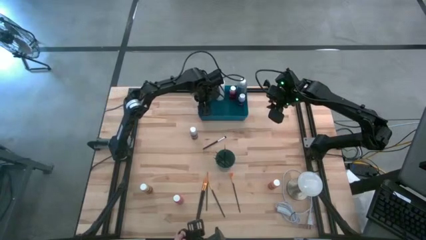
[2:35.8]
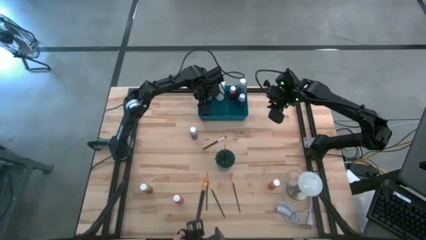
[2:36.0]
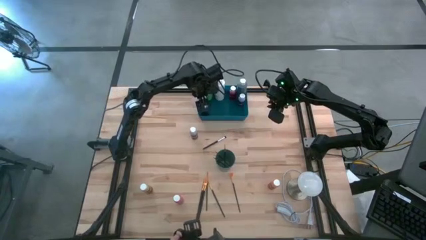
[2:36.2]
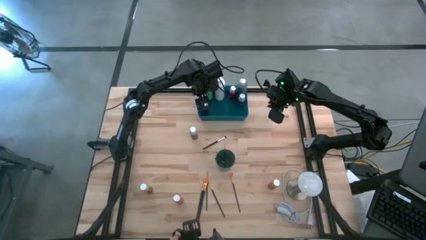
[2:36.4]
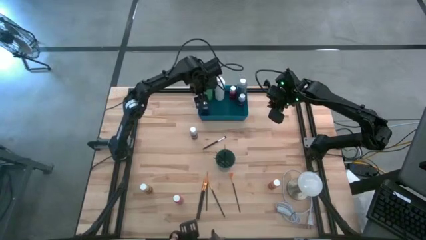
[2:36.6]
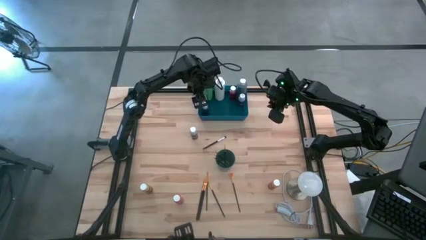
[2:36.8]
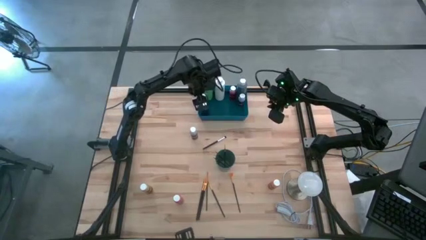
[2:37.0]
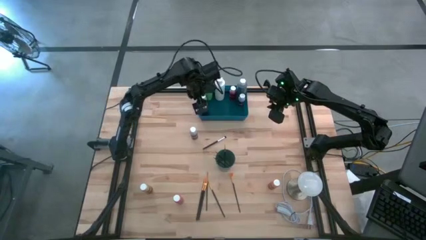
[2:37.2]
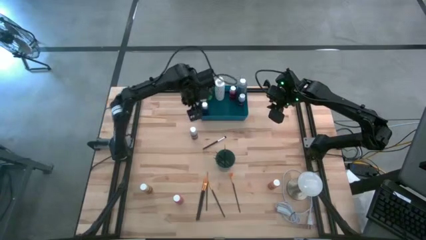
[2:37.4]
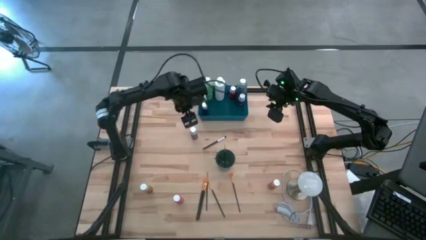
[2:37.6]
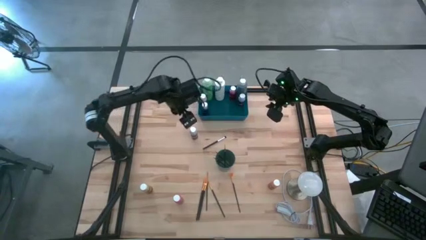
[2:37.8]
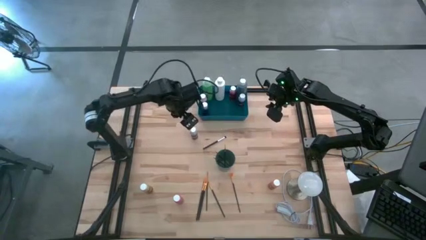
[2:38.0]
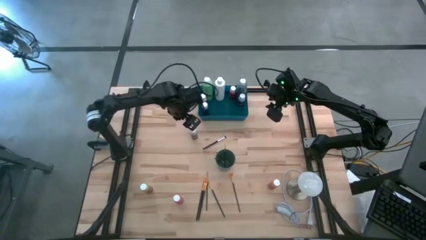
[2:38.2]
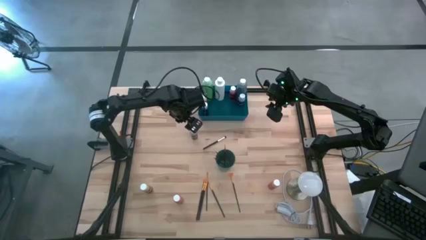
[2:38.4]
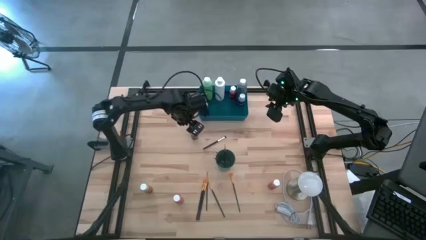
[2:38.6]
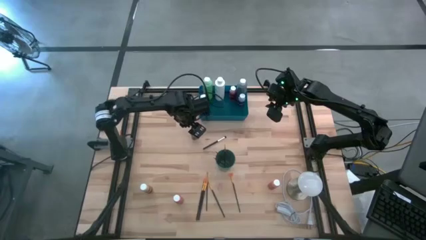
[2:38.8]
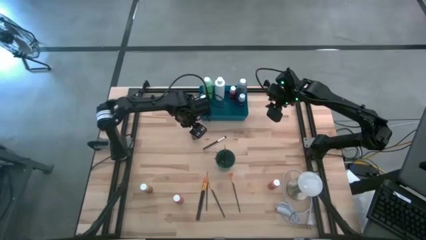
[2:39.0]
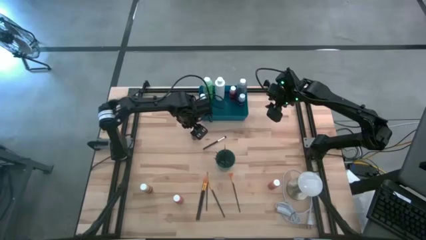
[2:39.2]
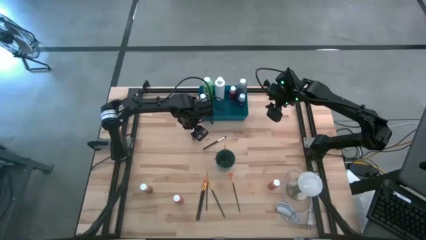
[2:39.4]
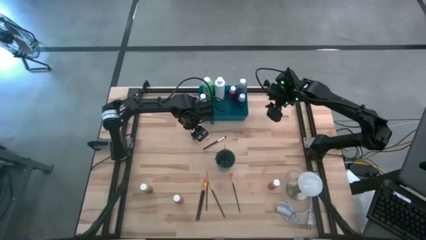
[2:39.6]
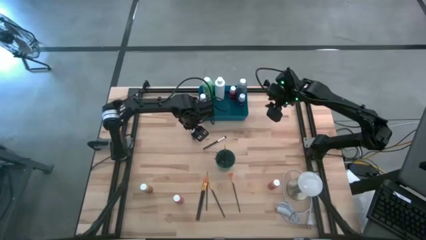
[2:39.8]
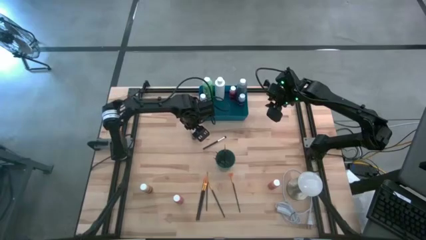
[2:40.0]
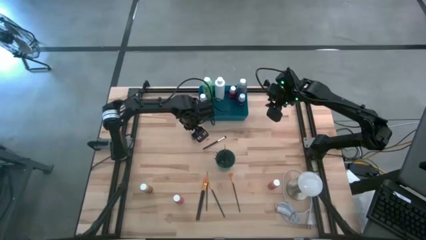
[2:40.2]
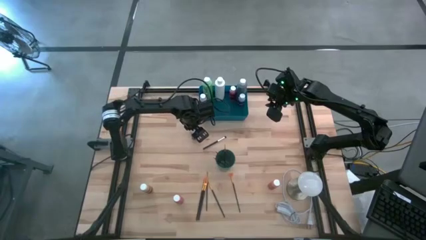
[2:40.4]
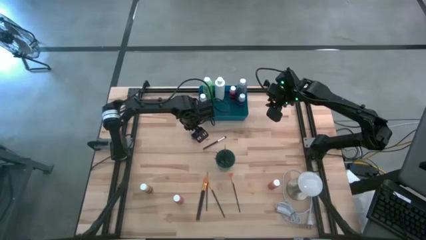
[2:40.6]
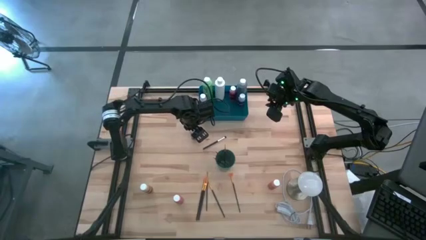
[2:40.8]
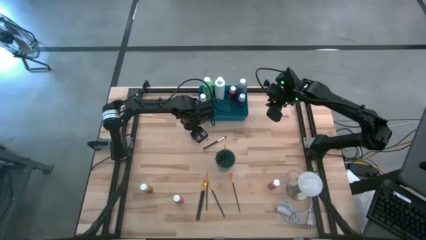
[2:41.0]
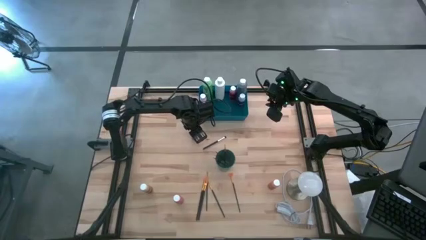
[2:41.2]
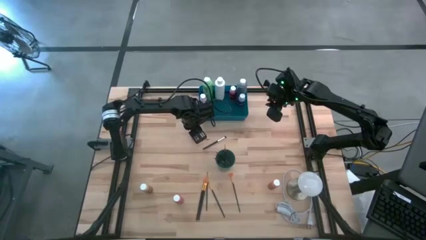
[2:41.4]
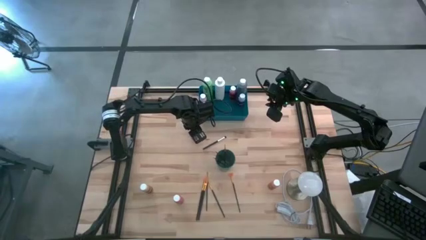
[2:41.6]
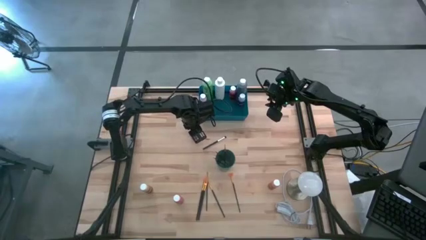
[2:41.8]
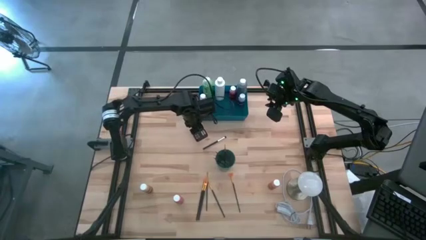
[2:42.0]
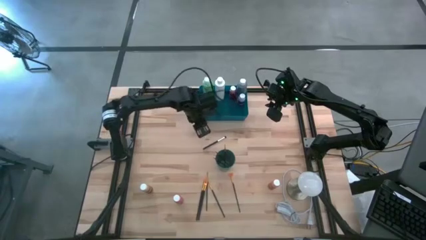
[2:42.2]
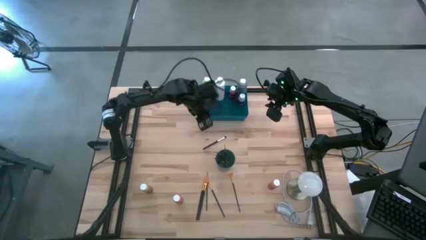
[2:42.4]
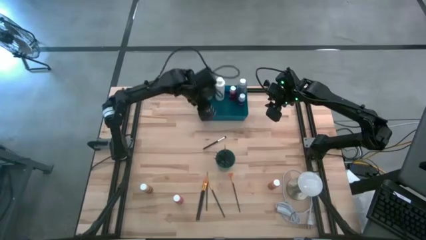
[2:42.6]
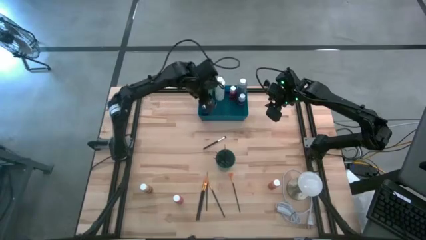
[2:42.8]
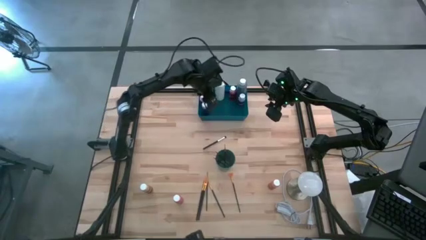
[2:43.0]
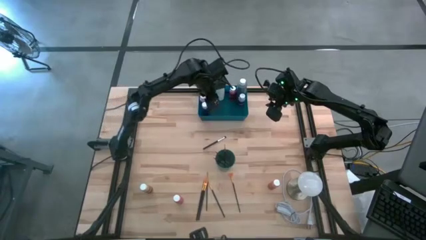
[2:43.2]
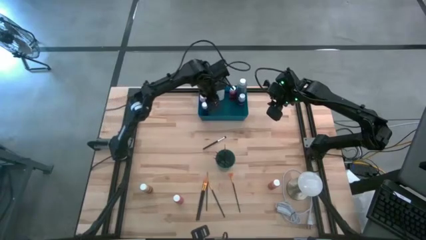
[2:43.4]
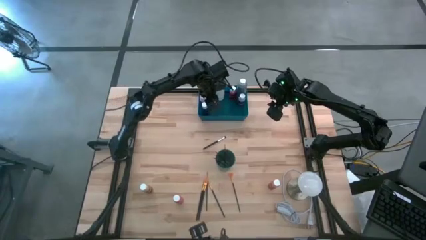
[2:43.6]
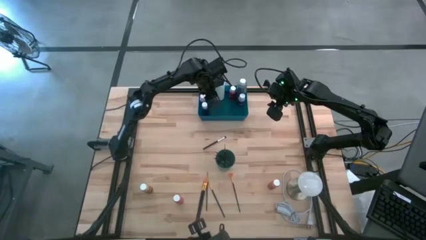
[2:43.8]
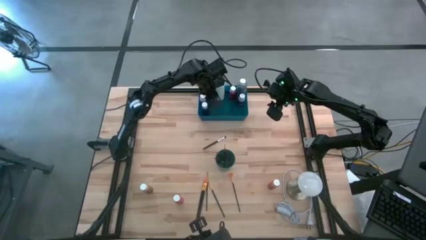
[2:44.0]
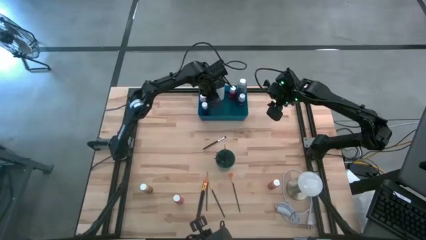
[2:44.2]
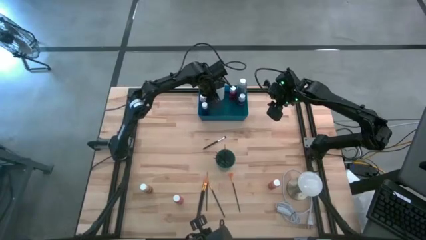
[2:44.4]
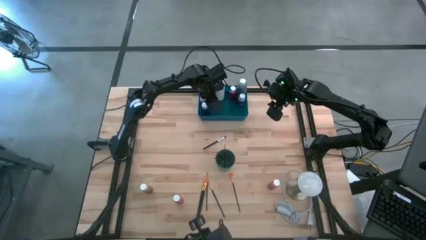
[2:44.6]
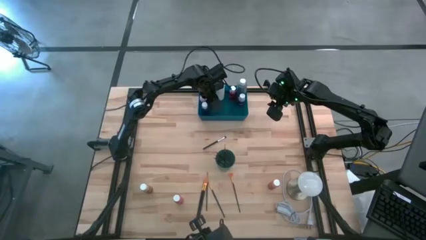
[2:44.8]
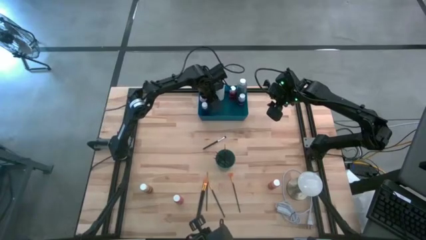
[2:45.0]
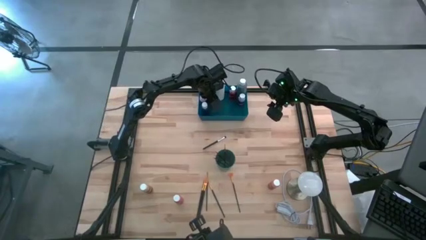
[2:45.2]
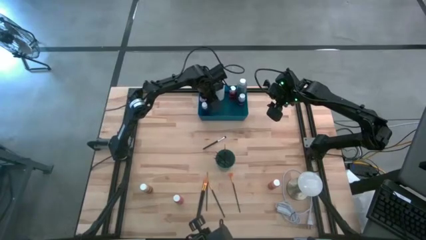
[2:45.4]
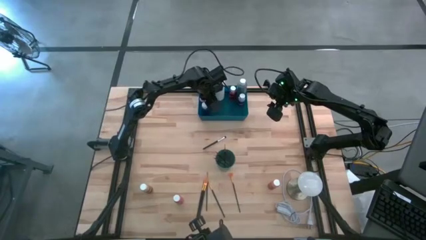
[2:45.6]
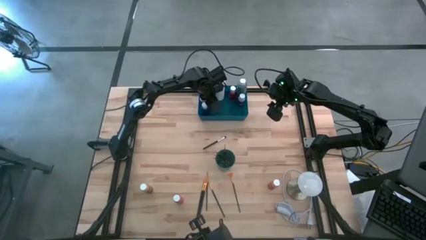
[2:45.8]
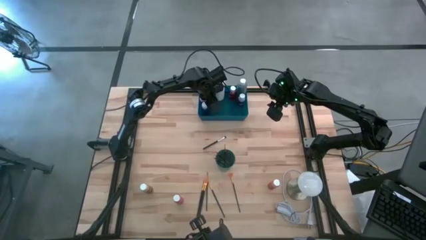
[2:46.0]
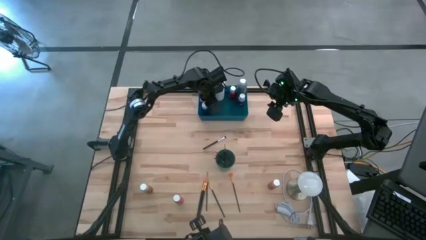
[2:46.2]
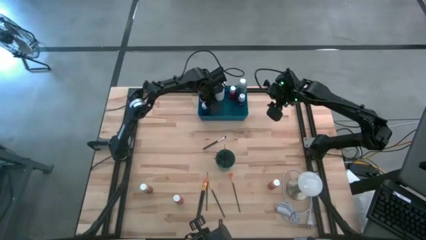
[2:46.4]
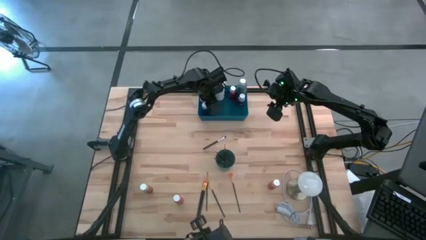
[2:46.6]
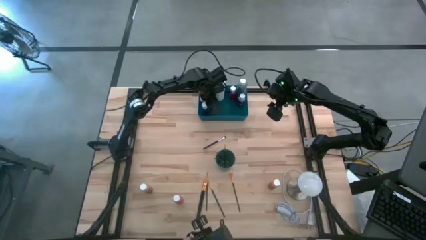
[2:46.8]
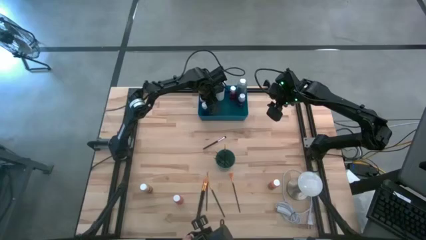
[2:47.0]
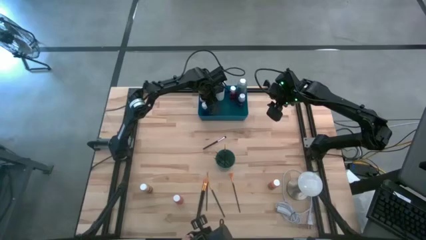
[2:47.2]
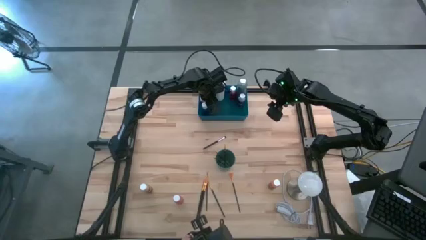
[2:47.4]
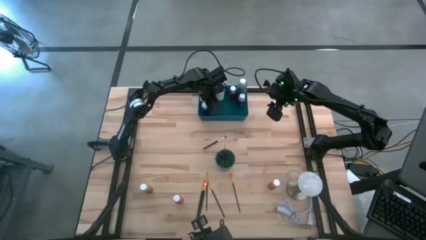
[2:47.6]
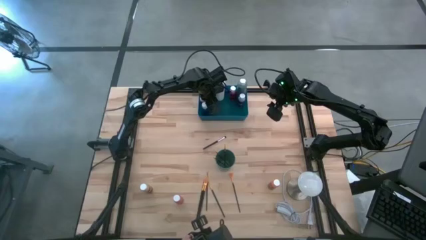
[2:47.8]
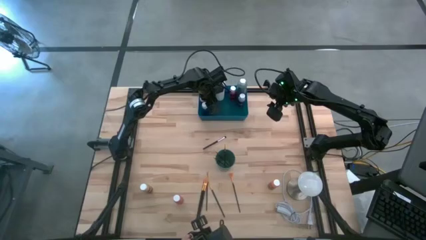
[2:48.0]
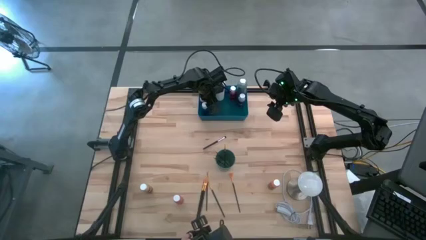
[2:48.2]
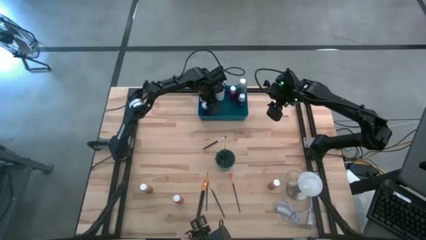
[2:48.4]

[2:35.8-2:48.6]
Task: Pick & Place Paint Supplies
Put the gray paint bottle into the blue bin
